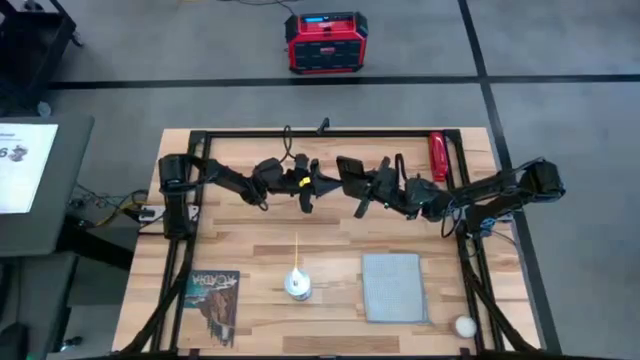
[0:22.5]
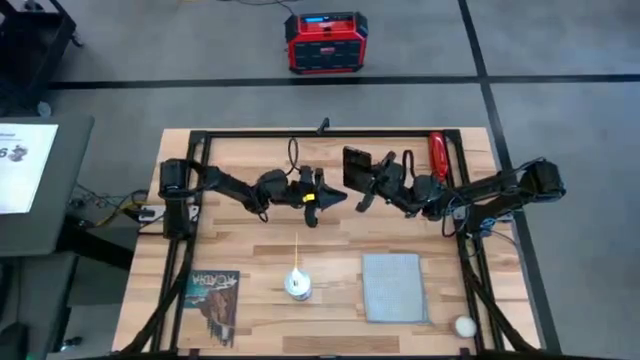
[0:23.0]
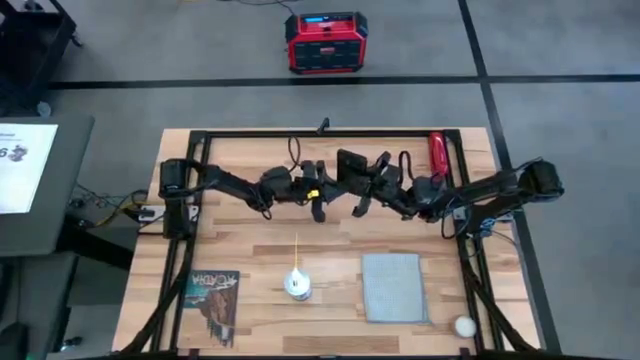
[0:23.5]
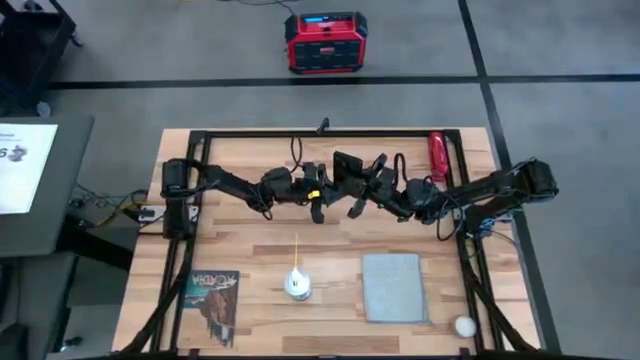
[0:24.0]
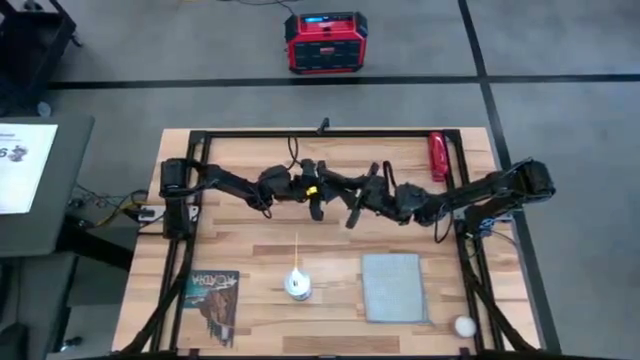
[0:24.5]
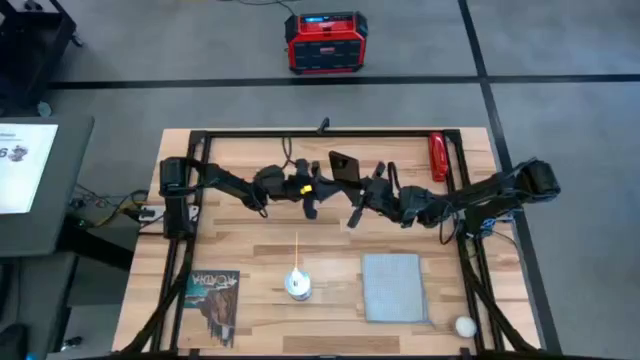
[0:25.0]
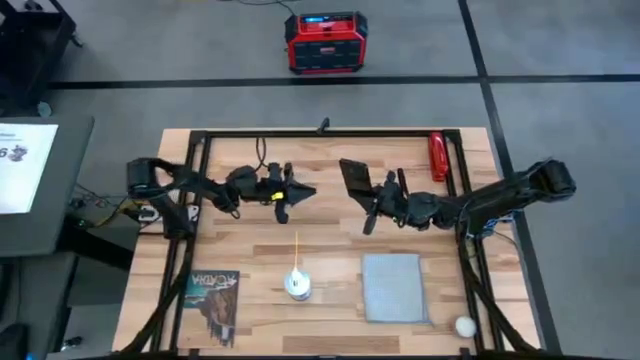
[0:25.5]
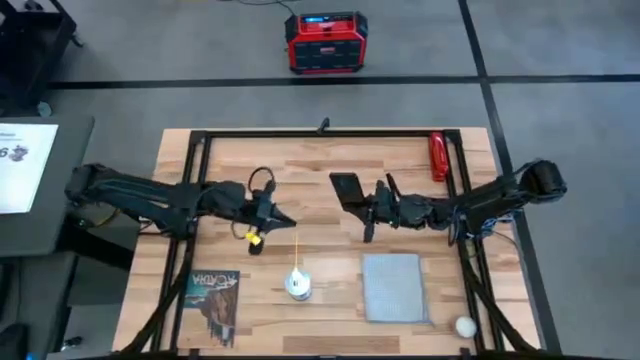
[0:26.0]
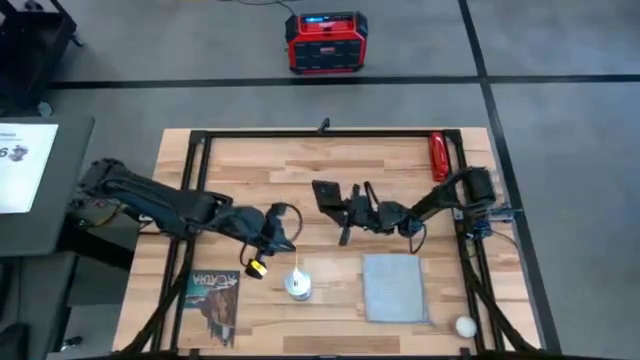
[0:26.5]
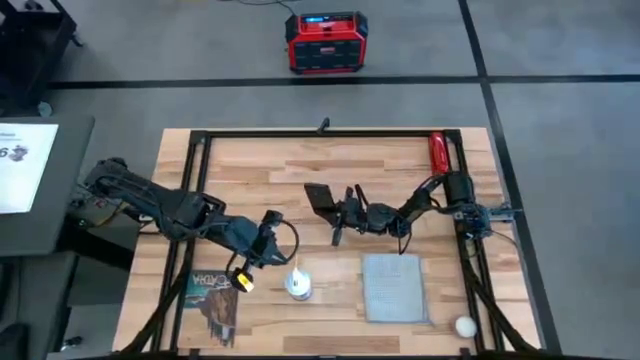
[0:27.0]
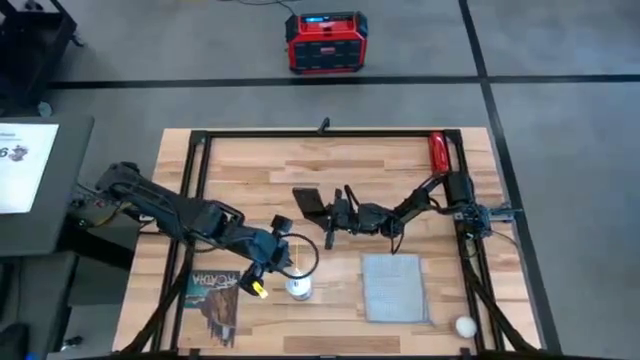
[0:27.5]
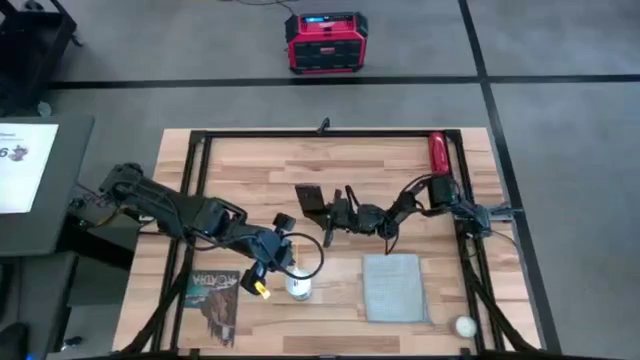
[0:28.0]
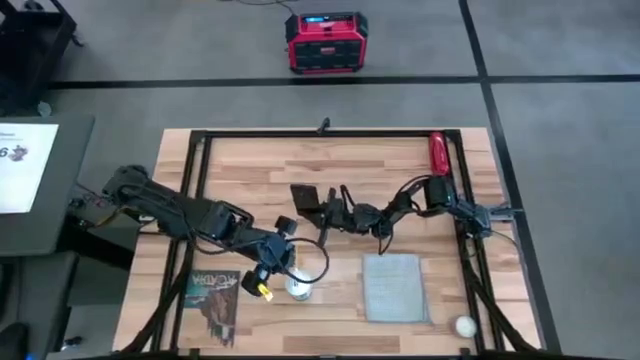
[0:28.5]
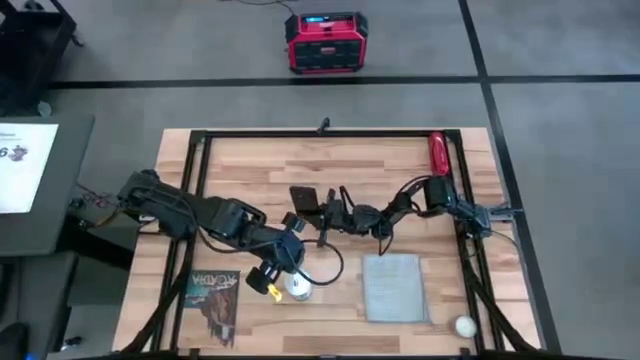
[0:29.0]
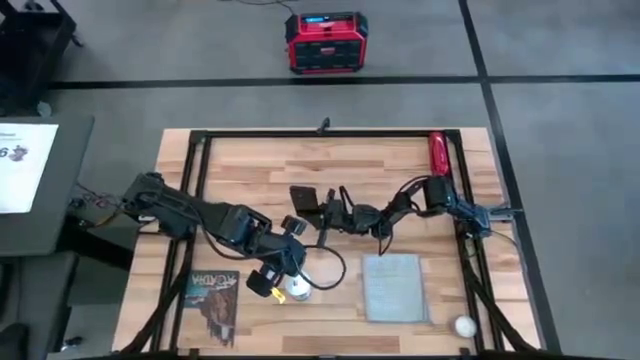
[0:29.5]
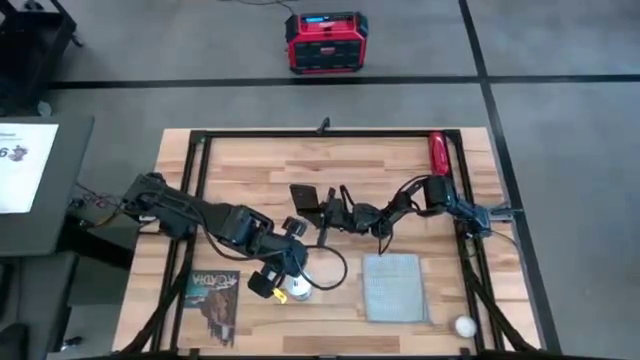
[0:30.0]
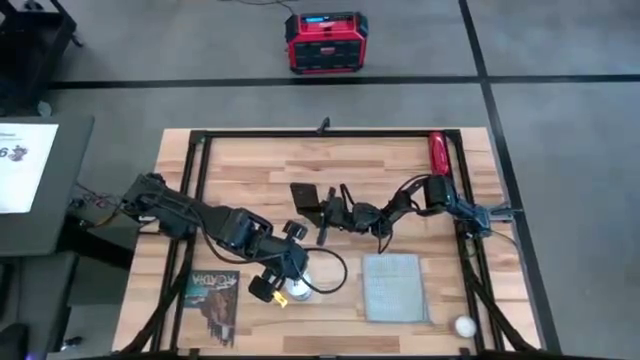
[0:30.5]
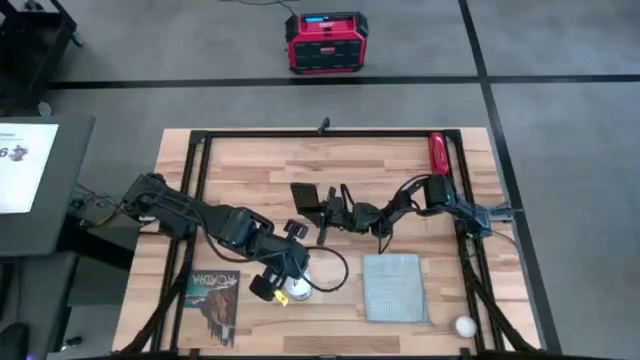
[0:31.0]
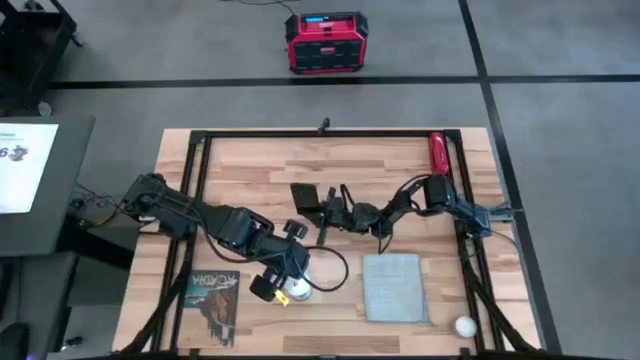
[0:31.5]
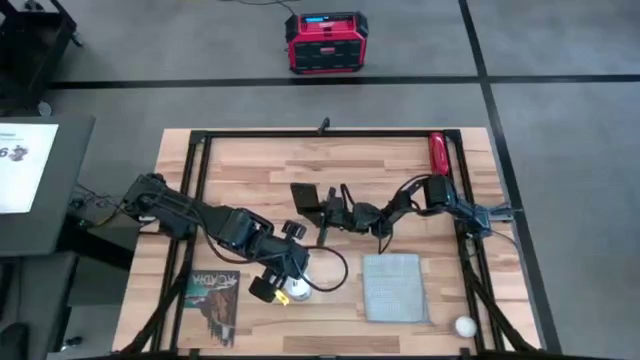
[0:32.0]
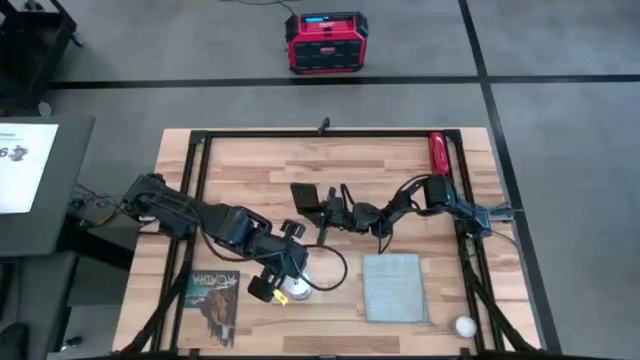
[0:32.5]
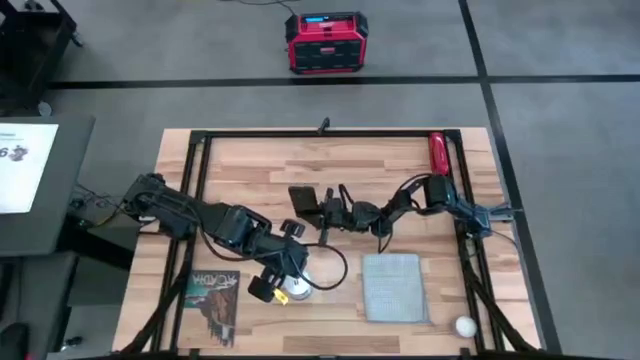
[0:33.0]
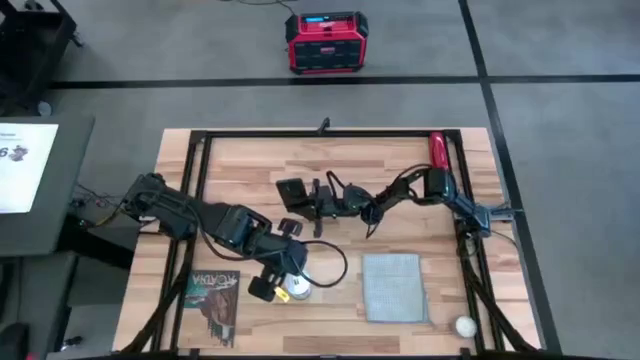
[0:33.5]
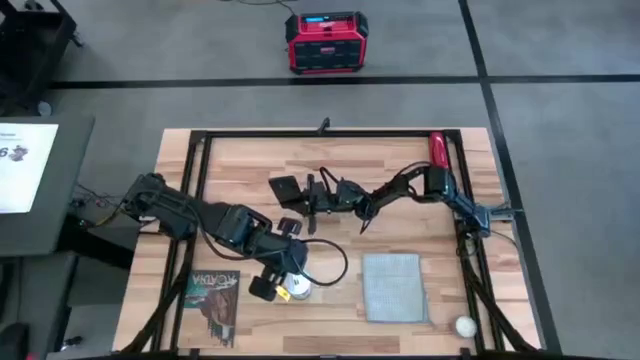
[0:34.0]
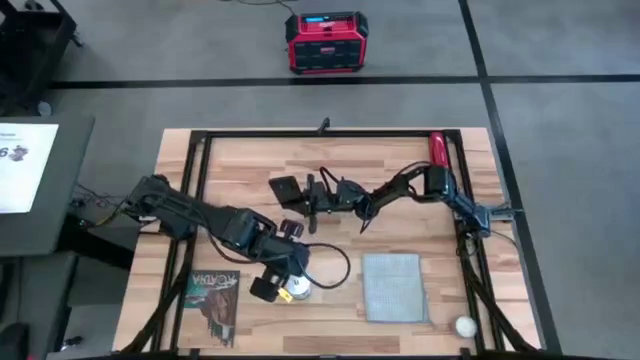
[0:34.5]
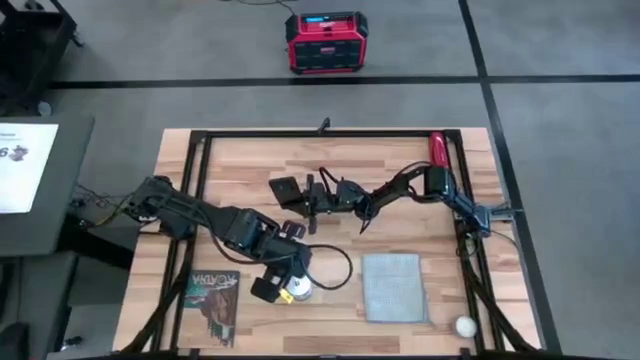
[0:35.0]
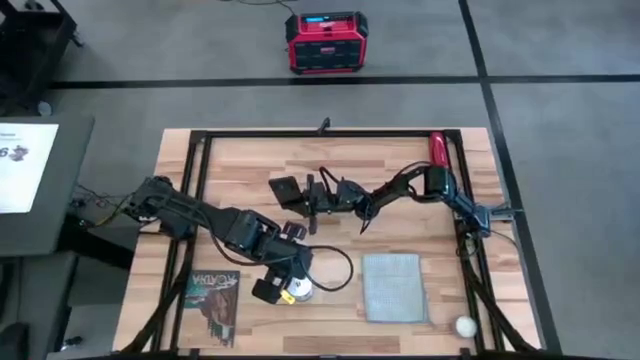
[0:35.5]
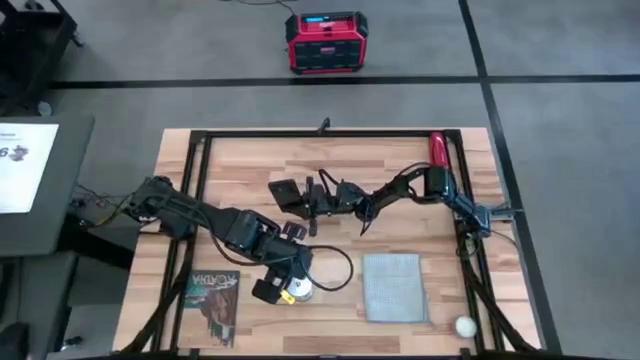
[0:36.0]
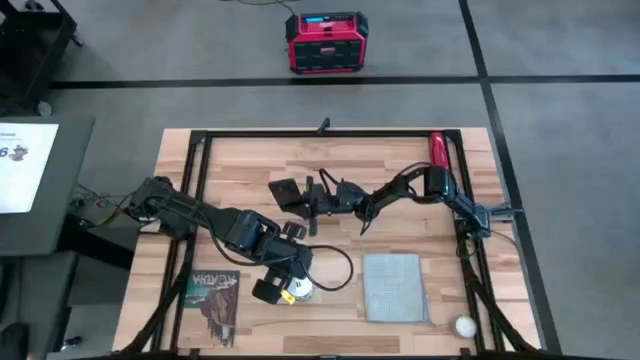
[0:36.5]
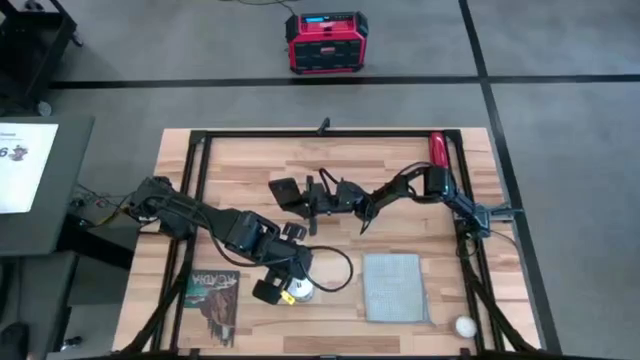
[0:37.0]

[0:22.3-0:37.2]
Task: Apply microfiber cloth
Spray the back of the cellphone using the spray bottle

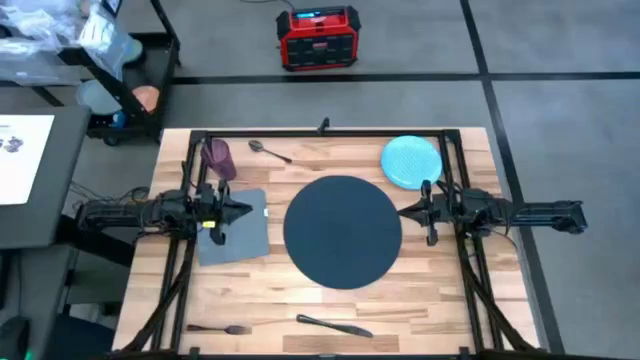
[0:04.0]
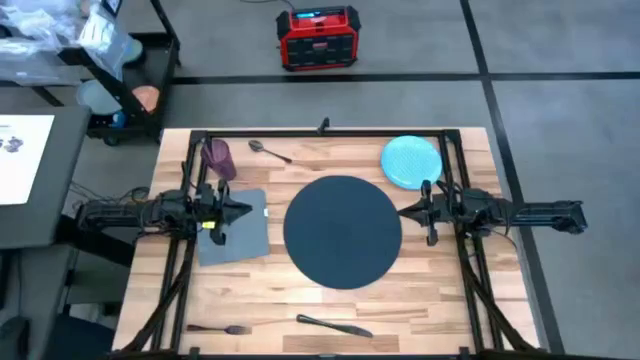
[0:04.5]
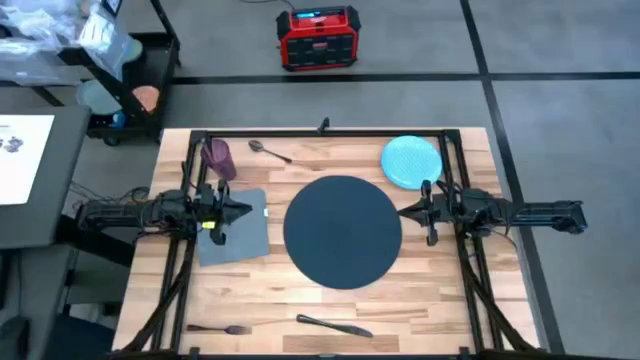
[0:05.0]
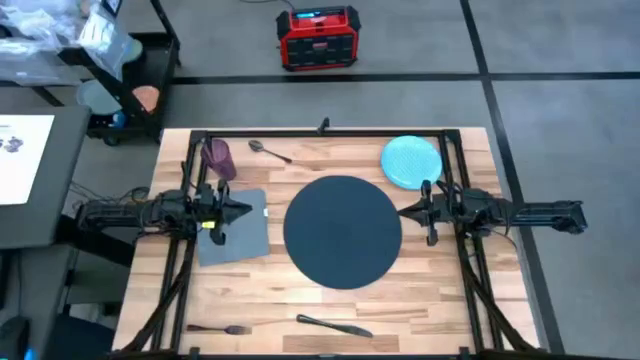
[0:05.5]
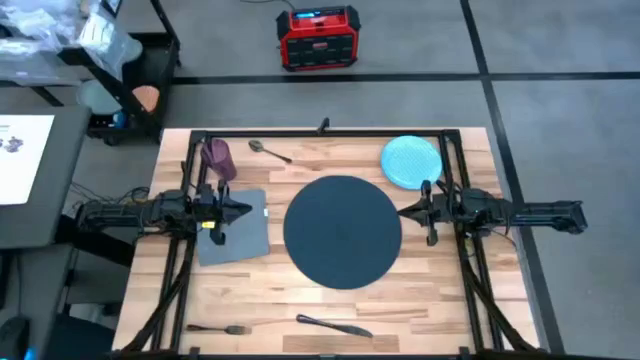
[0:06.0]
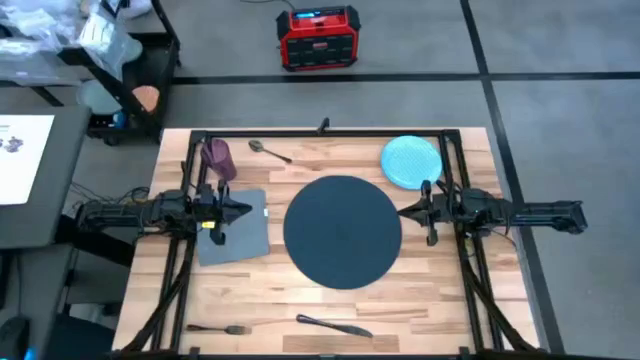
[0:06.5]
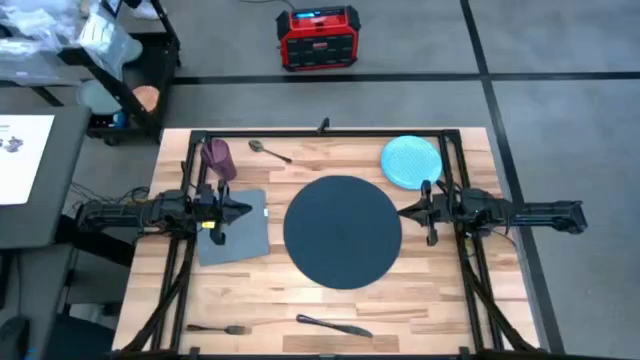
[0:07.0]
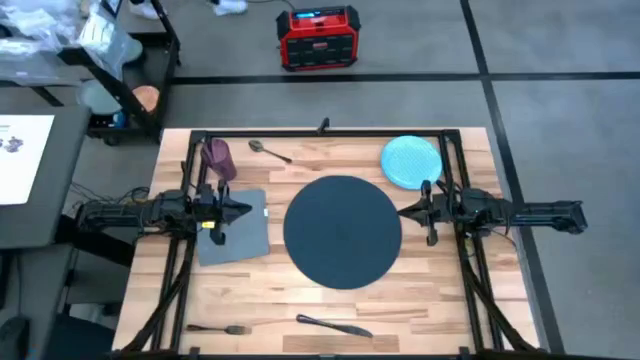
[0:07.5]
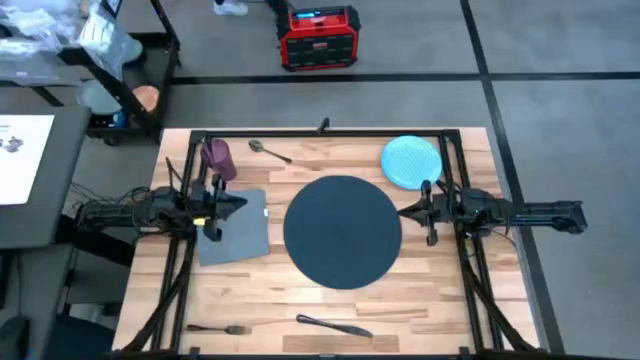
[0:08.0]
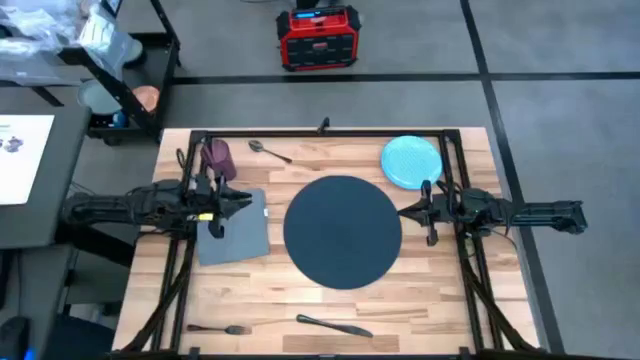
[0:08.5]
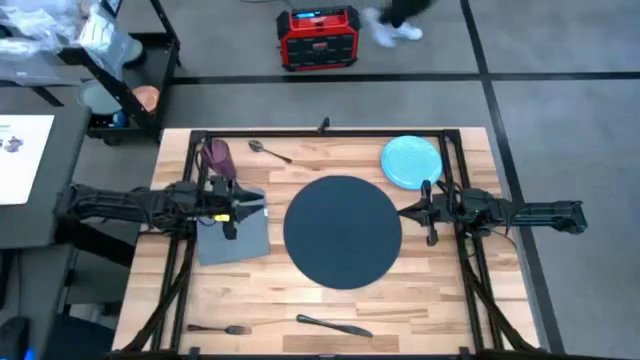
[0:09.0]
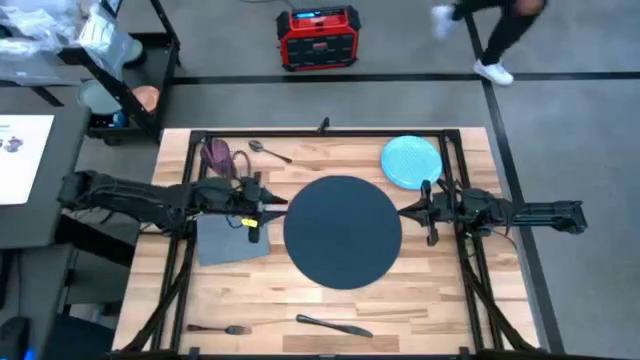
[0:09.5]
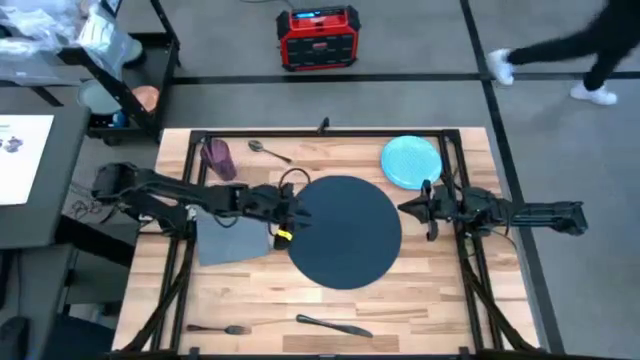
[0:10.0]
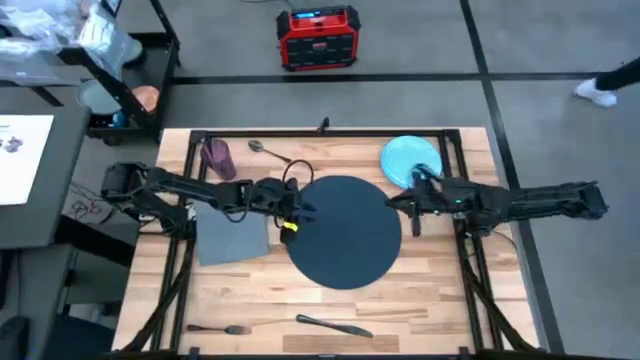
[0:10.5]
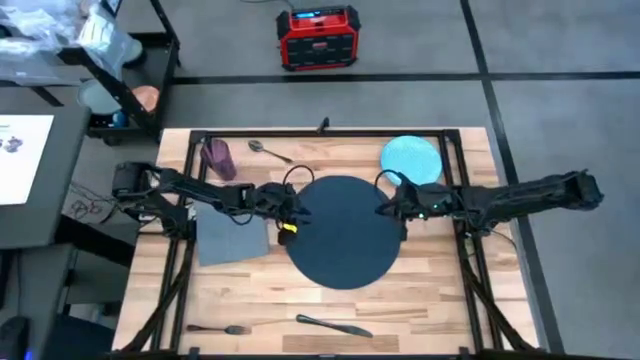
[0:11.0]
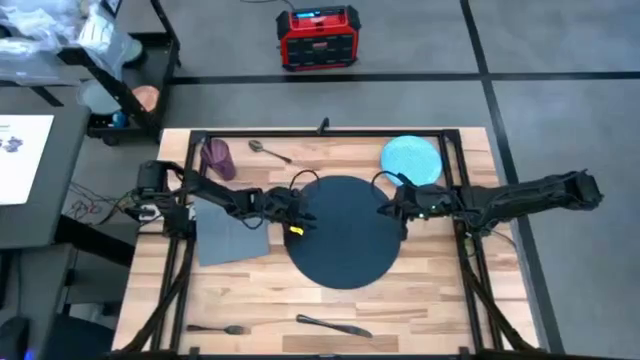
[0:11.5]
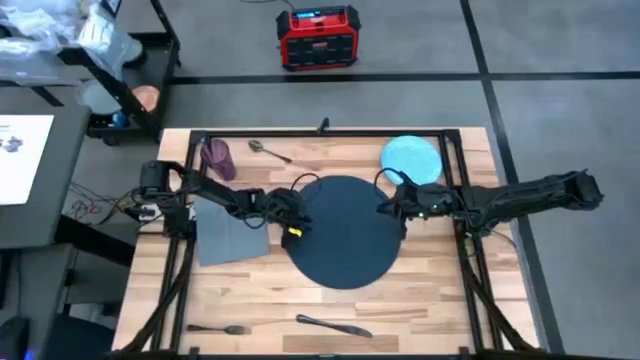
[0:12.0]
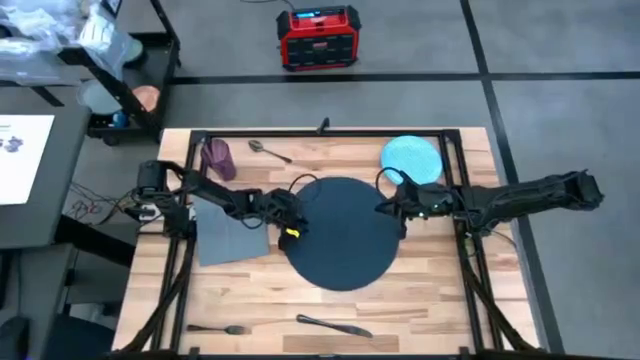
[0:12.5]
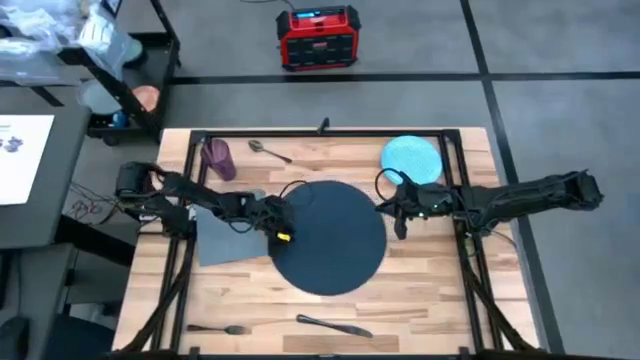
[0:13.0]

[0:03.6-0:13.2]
Task: Set table place
Adjust the dark blue table mat
